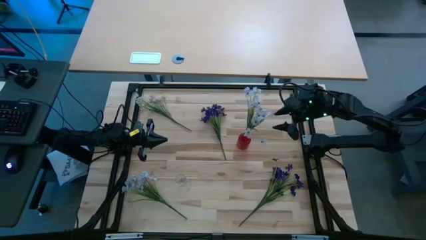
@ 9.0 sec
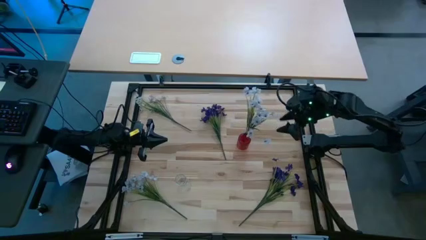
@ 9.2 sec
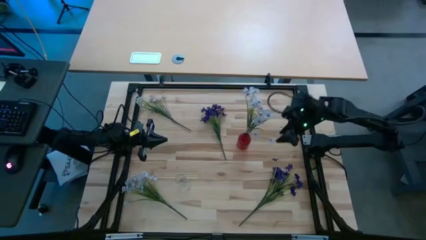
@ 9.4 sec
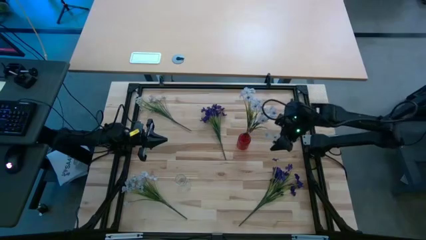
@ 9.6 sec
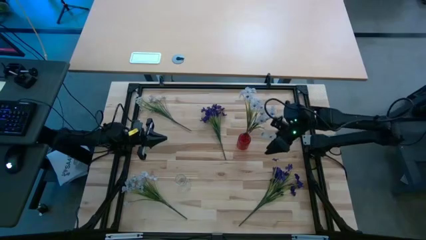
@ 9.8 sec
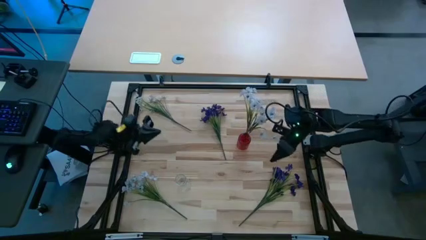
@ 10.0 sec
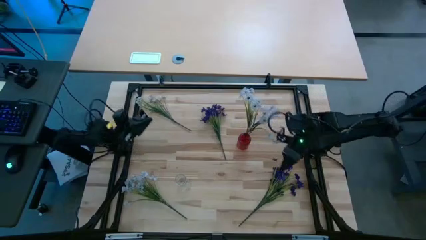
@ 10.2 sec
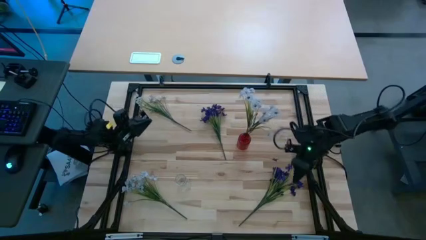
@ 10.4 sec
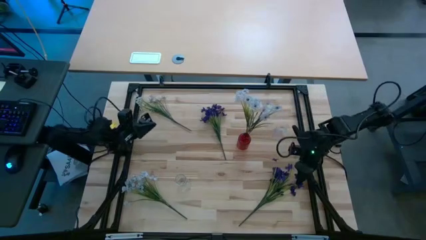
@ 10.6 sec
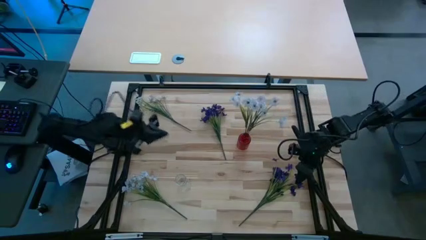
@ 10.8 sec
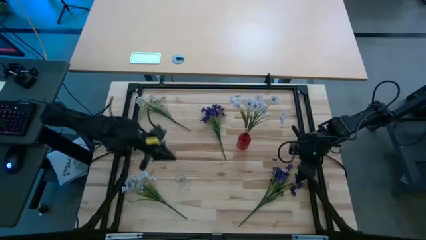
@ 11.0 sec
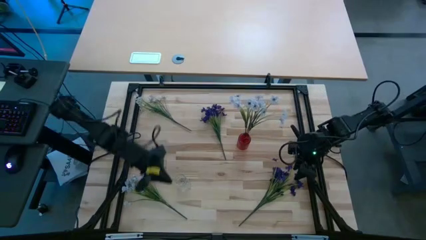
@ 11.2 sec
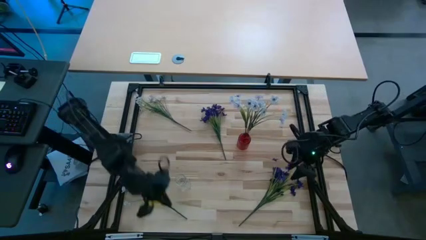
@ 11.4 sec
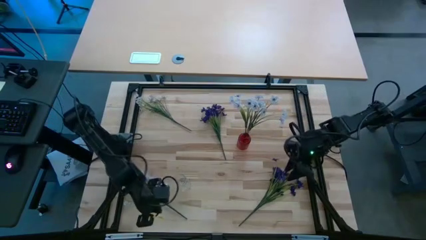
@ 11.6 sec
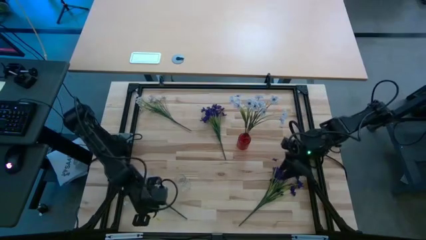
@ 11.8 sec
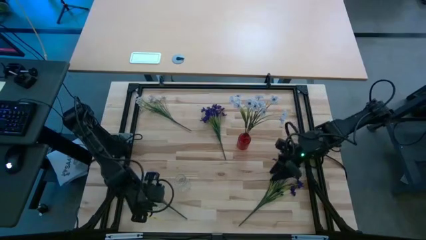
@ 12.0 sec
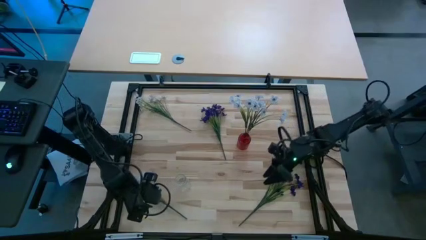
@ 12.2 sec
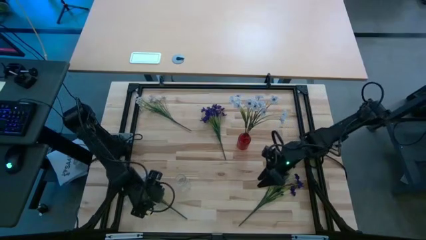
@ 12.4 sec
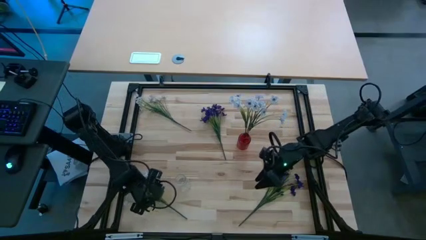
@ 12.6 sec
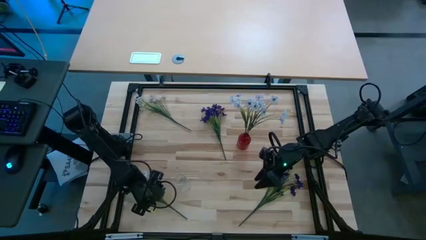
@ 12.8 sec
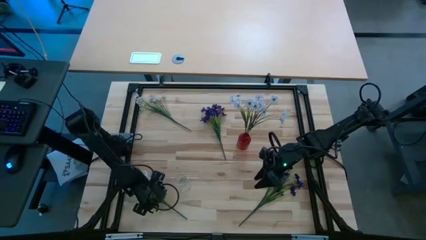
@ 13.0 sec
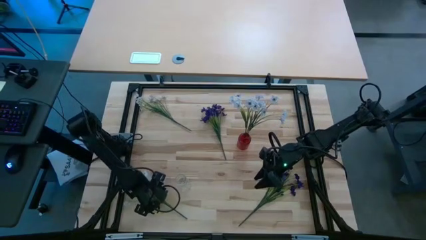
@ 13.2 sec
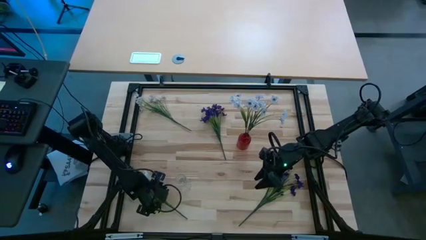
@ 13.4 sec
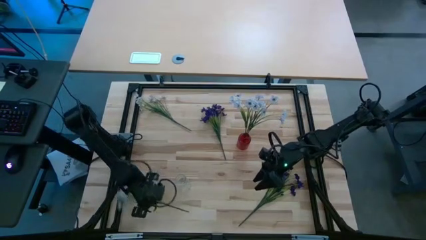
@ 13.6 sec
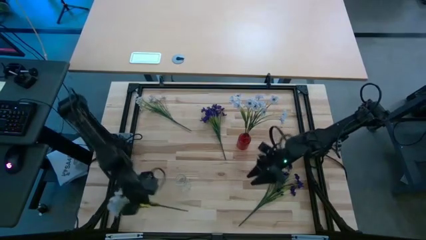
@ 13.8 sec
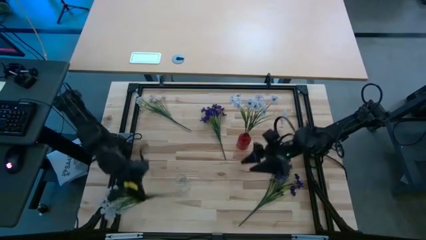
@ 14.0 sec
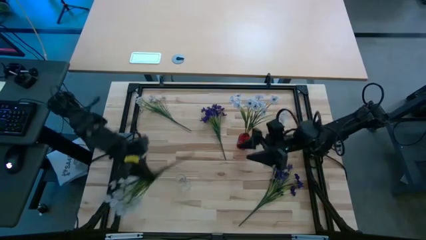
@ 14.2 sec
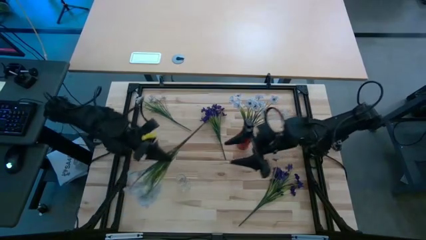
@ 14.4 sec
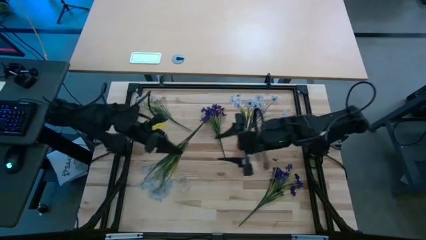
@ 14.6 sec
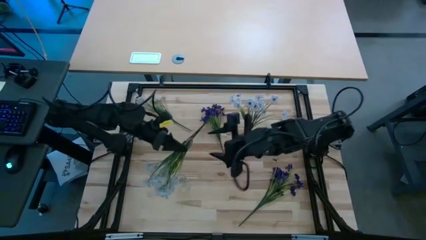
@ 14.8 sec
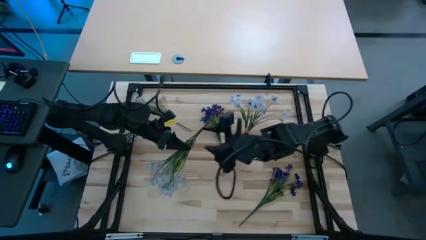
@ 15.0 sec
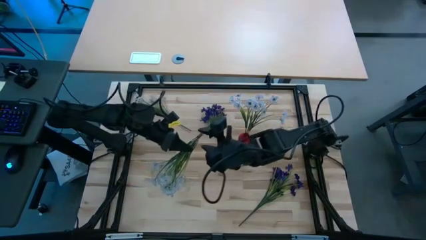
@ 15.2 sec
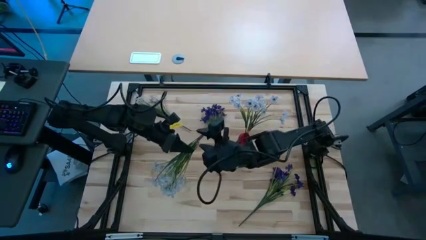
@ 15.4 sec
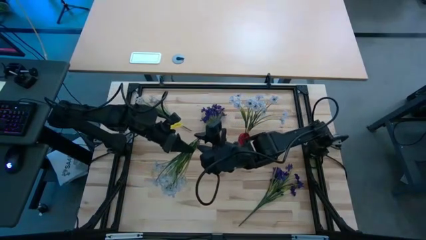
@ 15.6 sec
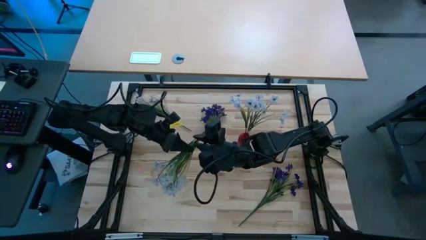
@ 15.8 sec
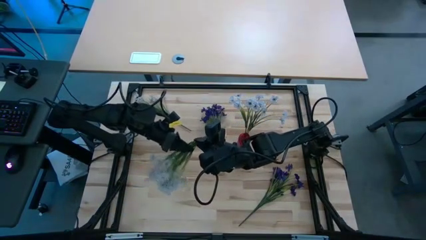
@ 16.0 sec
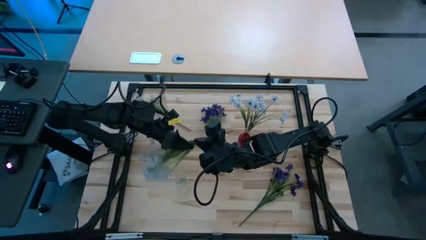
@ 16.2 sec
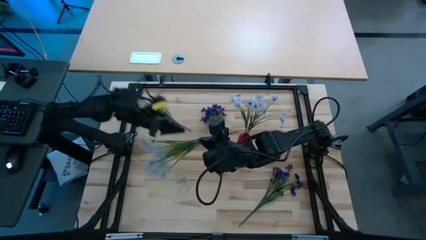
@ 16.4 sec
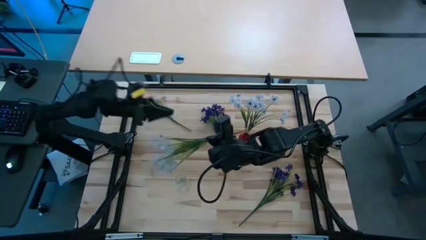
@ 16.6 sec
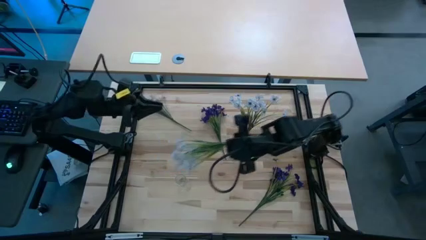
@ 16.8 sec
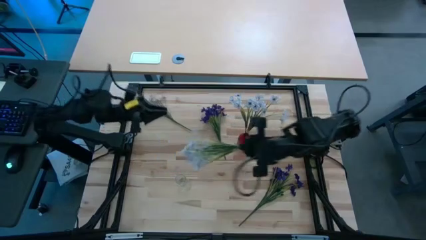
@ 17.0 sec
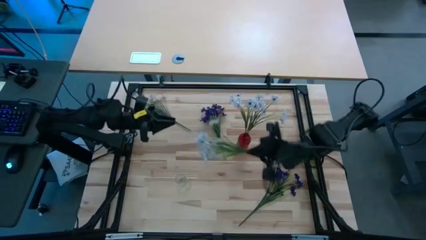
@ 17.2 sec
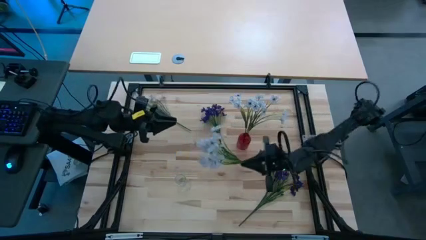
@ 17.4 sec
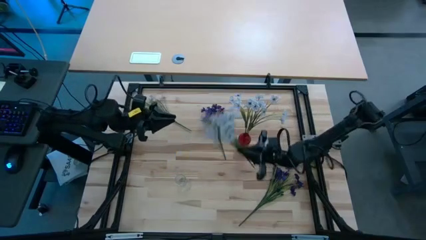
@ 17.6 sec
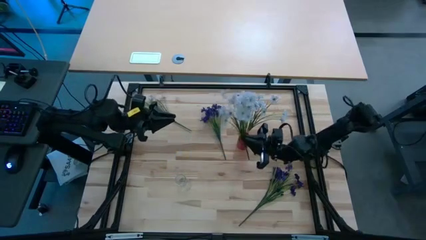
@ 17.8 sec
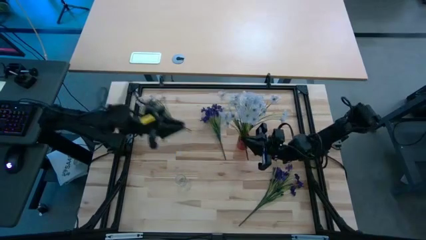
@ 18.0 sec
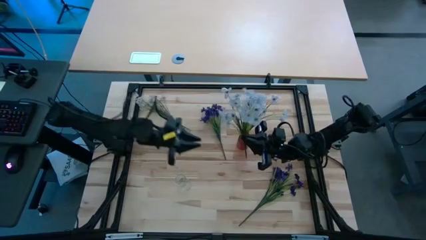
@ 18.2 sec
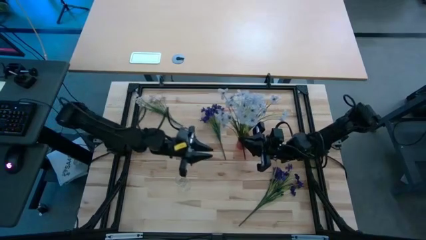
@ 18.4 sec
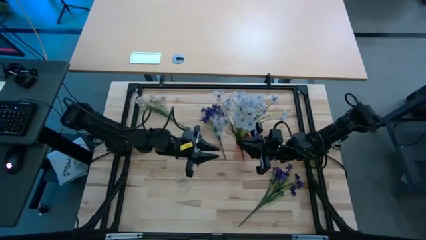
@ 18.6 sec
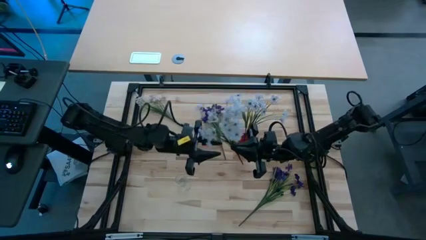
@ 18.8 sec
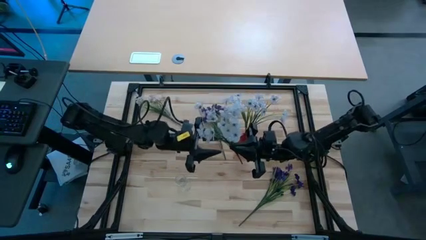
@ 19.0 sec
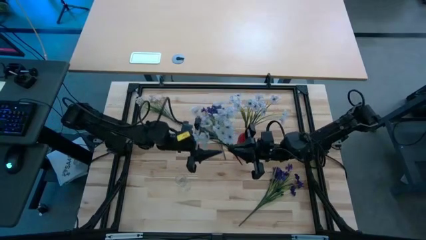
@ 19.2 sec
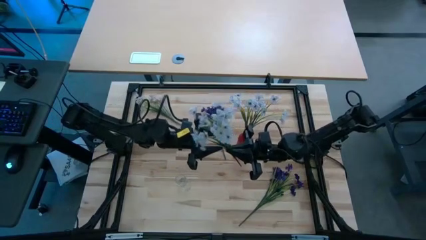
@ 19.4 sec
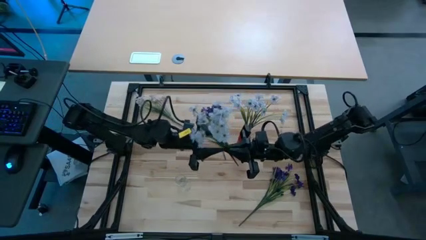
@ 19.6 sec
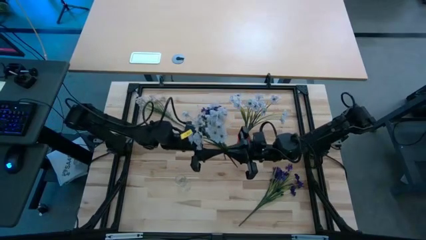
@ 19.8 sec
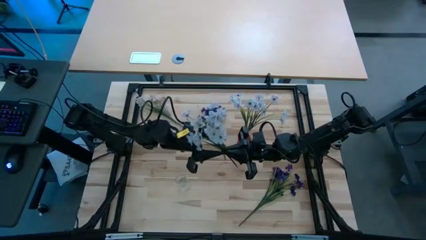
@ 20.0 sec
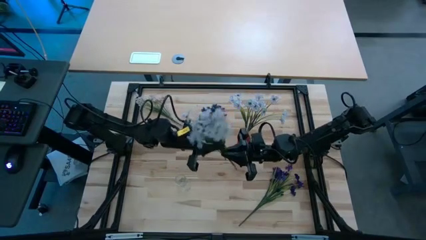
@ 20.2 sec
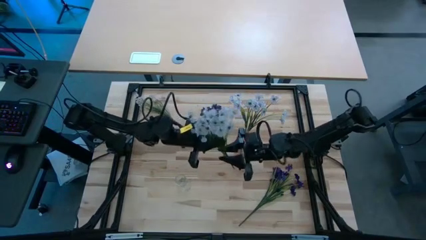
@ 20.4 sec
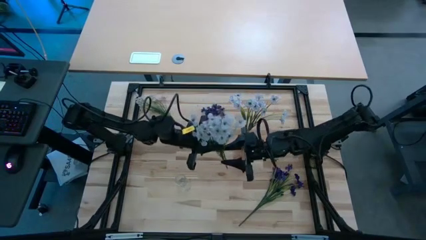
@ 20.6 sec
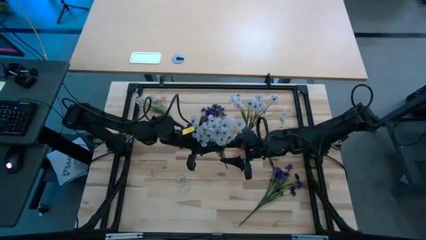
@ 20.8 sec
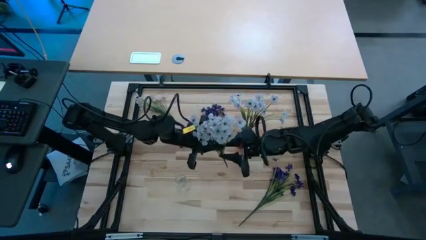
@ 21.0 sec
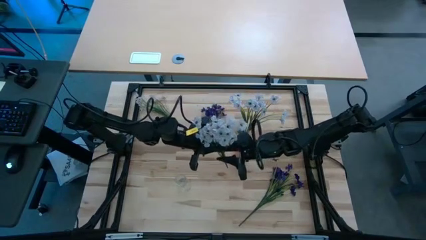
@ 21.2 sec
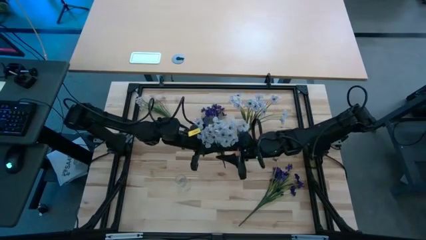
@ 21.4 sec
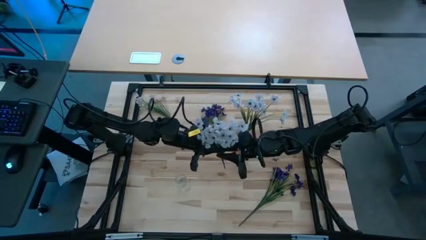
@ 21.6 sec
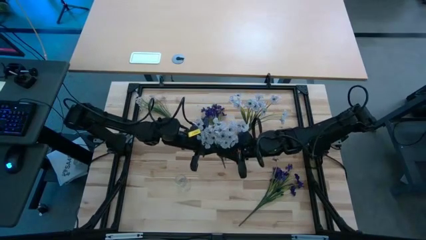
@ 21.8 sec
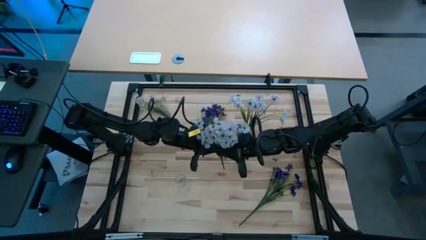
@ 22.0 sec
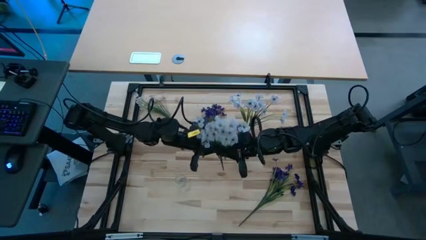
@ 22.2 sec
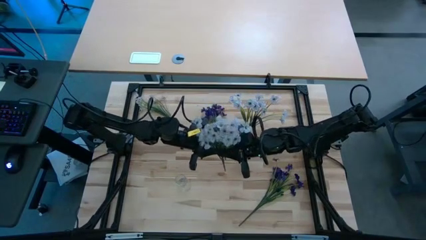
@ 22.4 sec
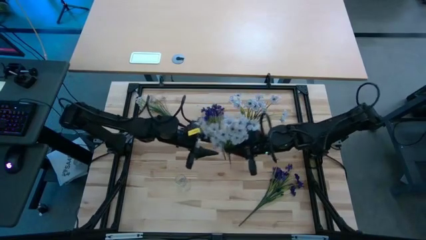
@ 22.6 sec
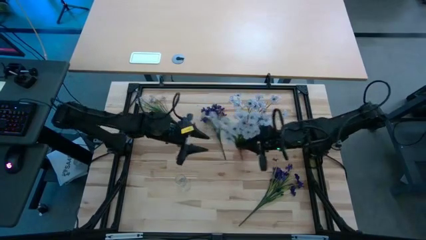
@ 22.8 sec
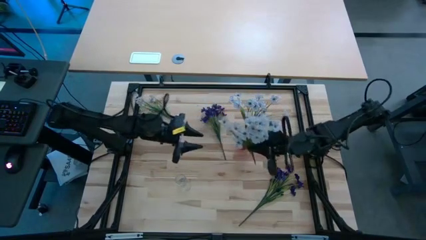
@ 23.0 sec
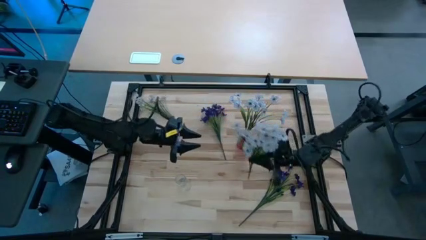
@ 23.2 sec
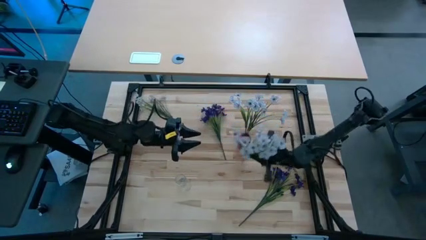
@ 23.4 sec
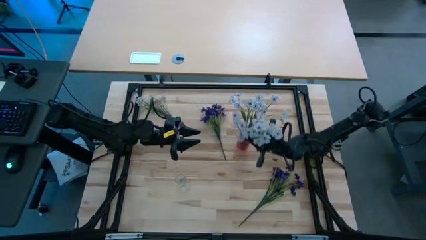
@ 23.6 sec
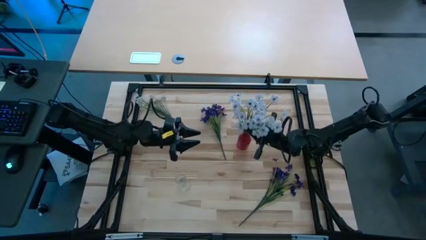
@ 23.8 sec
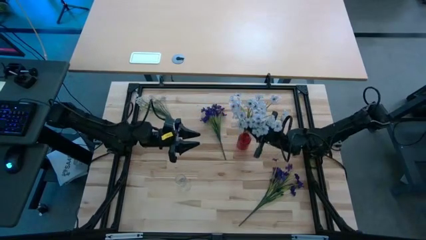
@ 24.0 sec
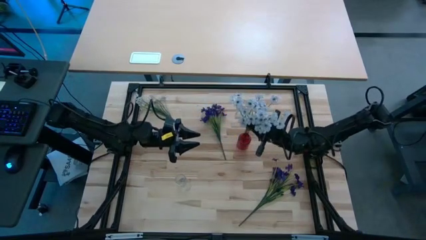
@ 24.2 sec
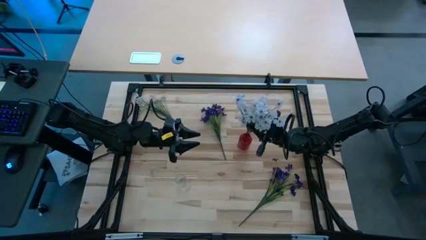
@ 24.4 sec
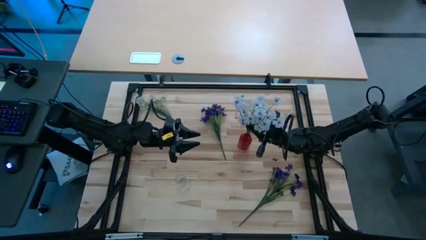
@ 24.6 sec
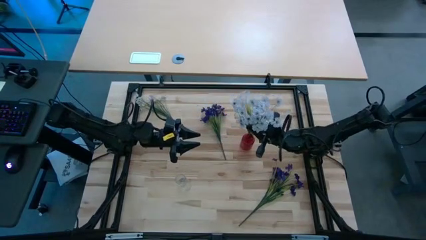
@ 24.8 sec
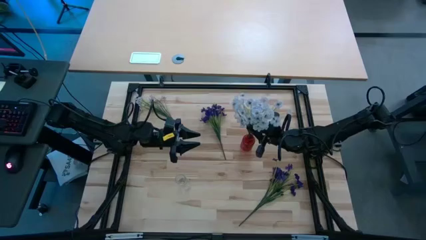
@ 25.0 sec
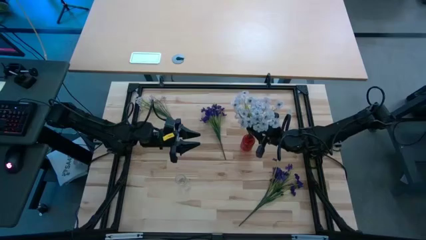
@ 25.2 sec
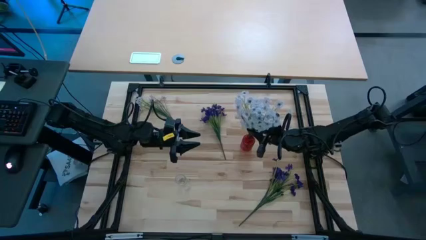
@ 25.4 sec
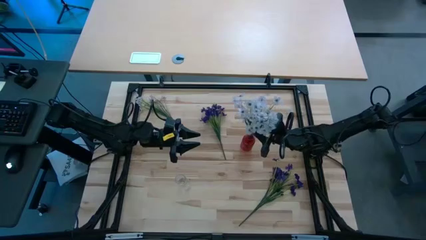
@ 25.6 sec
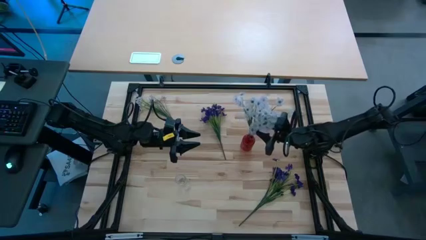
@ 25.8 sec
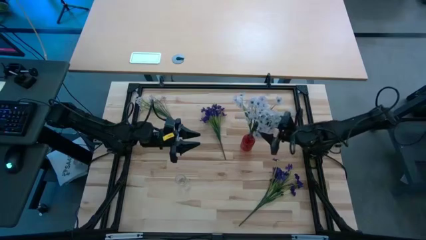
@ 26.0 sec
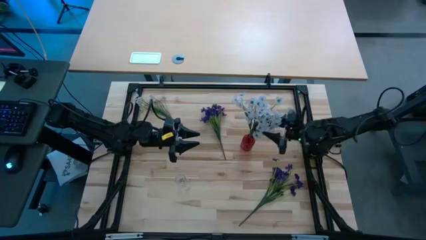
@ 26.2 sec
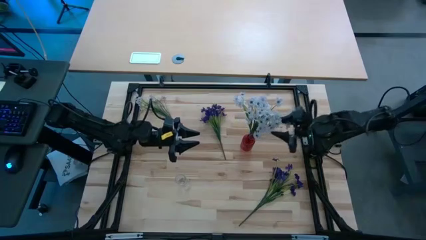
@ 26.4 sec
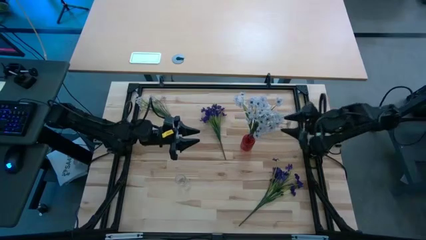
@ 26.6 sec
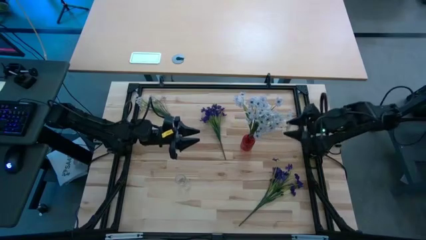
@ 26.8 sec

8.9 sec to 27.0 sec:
Task: Sort flowers into vase by color
Put the bottom white flowers into the red vase
